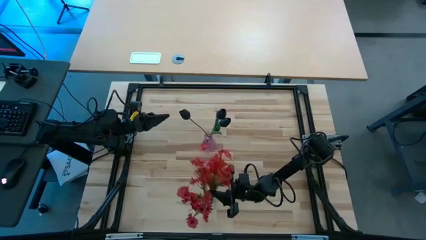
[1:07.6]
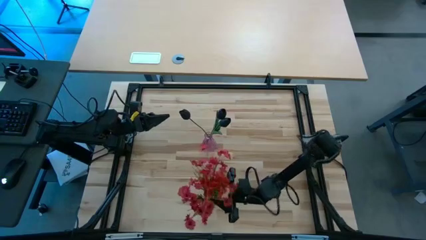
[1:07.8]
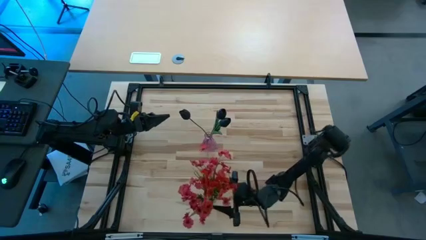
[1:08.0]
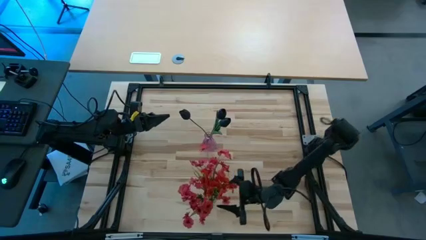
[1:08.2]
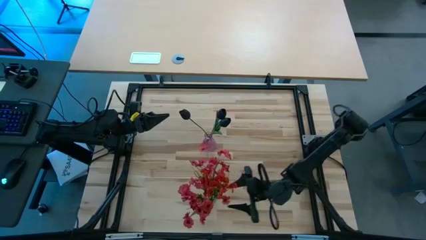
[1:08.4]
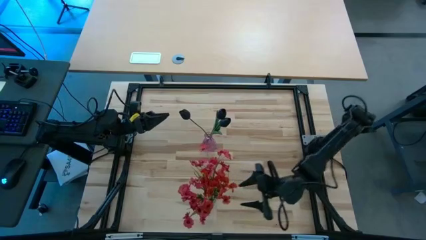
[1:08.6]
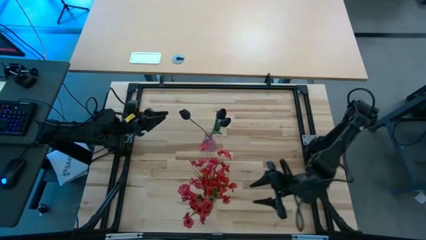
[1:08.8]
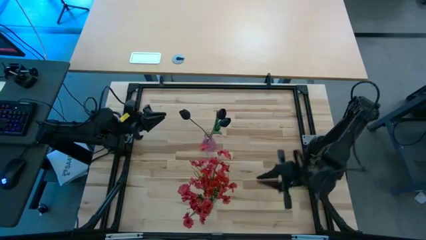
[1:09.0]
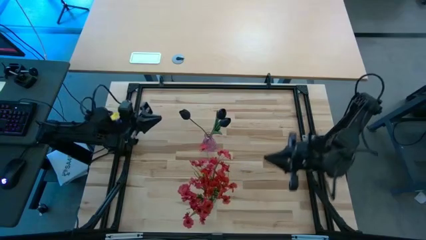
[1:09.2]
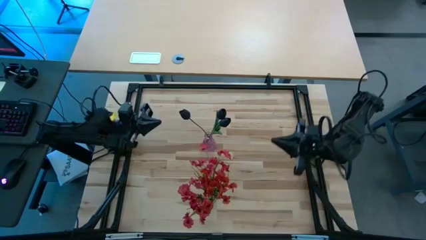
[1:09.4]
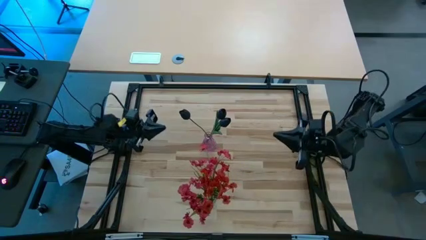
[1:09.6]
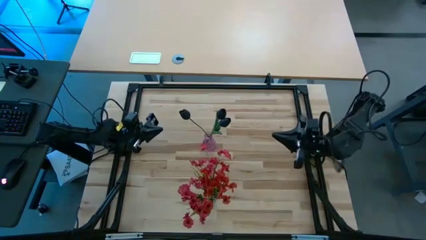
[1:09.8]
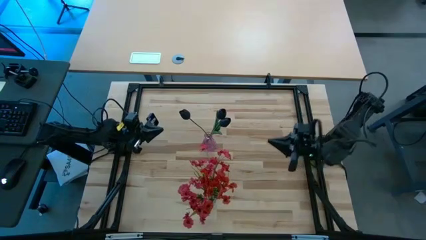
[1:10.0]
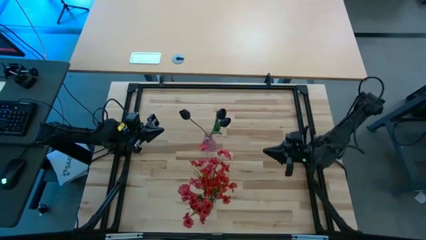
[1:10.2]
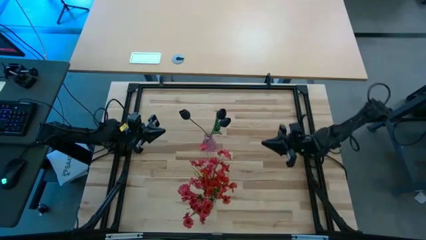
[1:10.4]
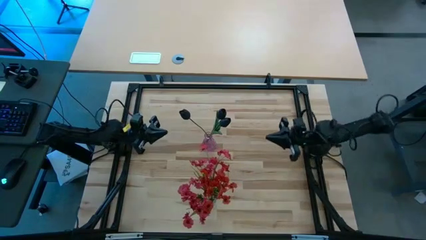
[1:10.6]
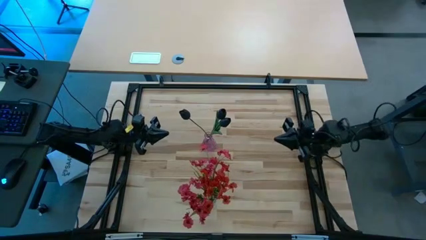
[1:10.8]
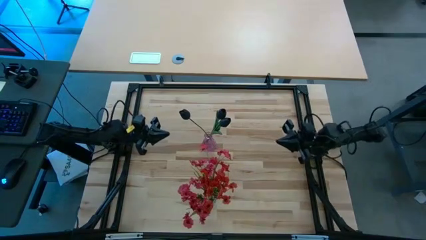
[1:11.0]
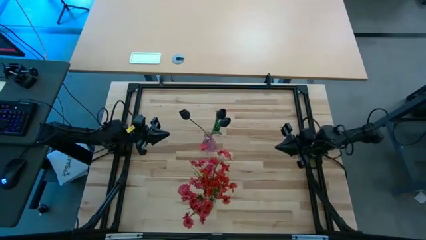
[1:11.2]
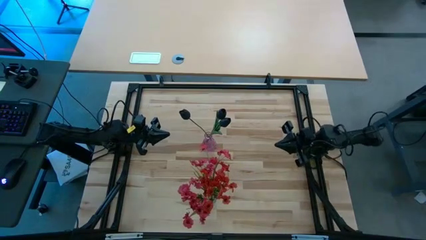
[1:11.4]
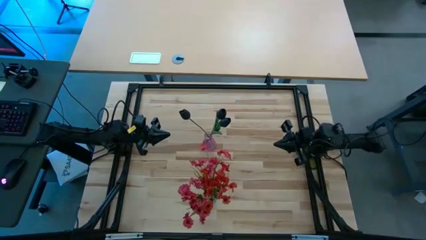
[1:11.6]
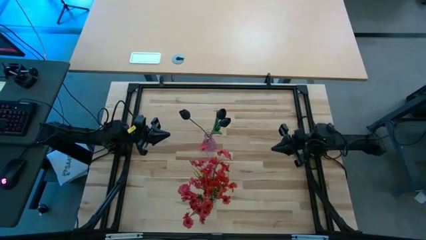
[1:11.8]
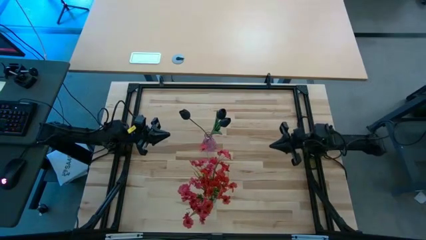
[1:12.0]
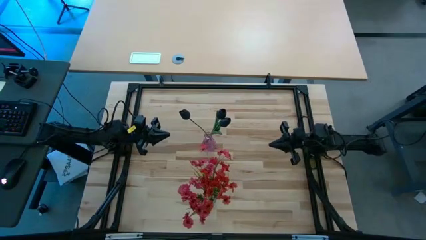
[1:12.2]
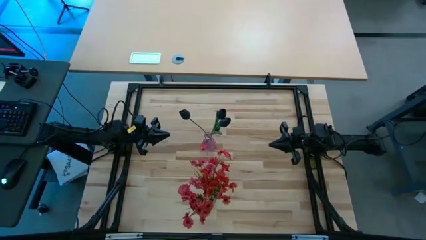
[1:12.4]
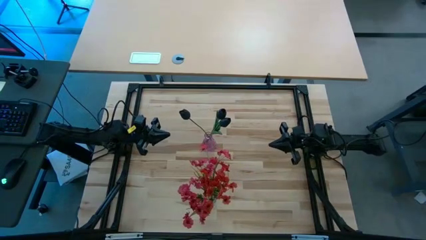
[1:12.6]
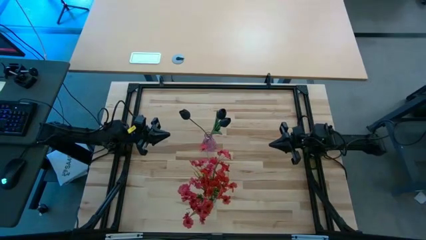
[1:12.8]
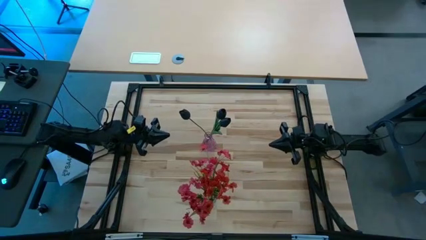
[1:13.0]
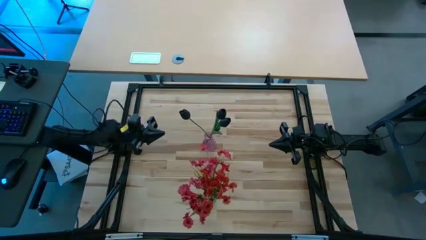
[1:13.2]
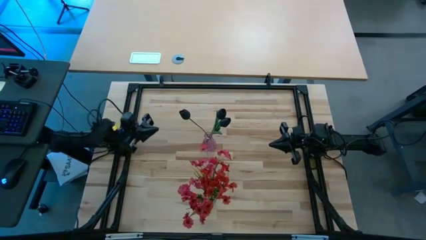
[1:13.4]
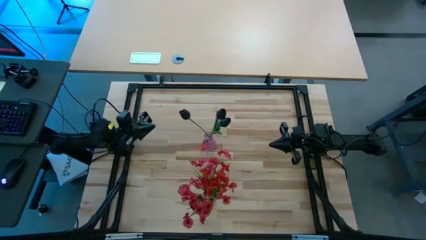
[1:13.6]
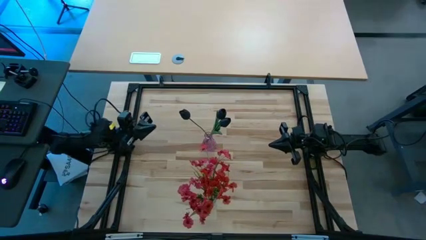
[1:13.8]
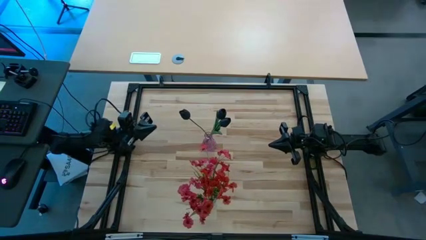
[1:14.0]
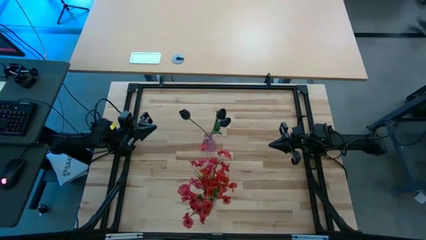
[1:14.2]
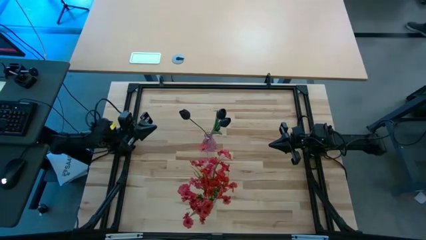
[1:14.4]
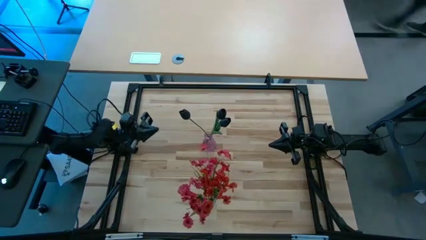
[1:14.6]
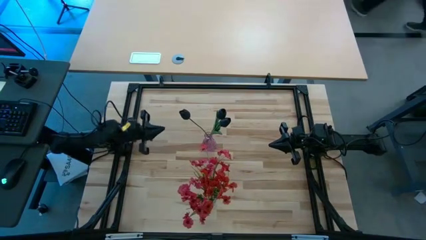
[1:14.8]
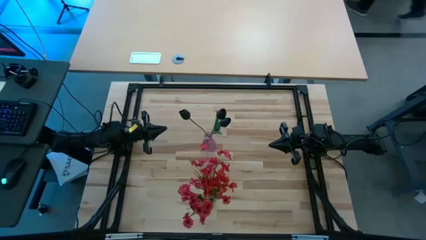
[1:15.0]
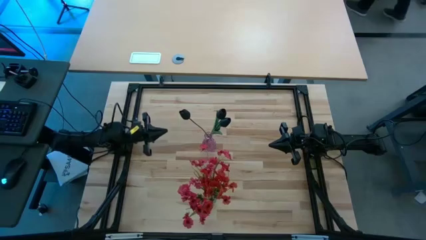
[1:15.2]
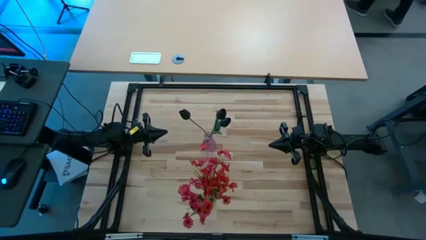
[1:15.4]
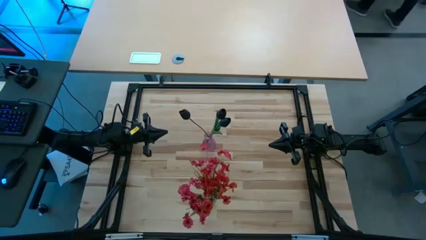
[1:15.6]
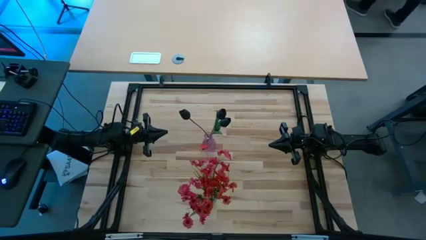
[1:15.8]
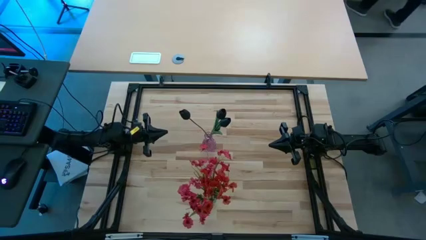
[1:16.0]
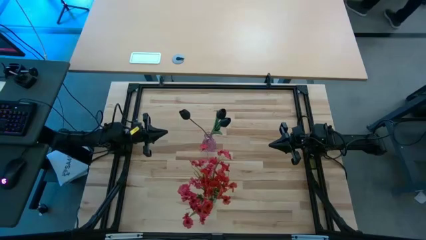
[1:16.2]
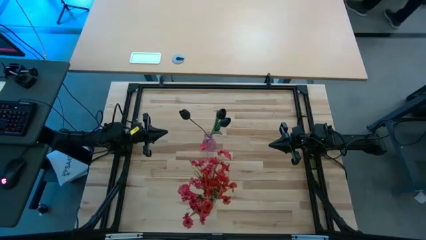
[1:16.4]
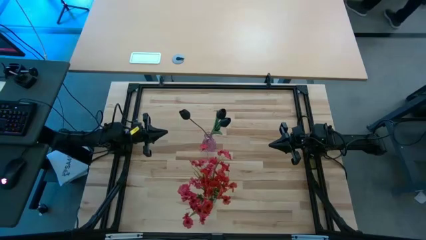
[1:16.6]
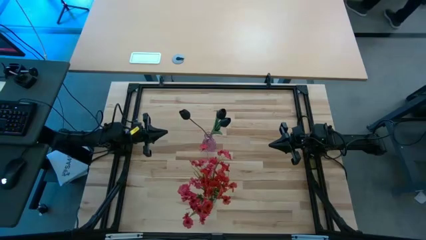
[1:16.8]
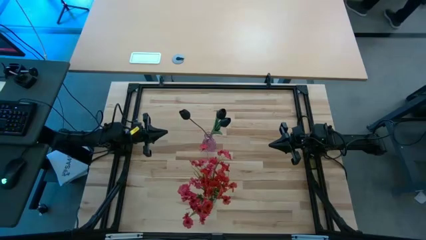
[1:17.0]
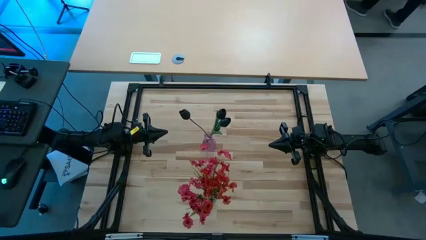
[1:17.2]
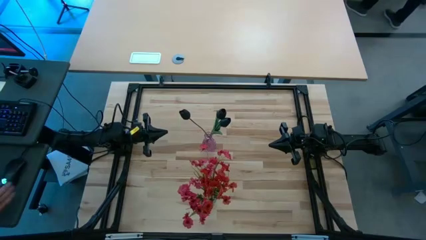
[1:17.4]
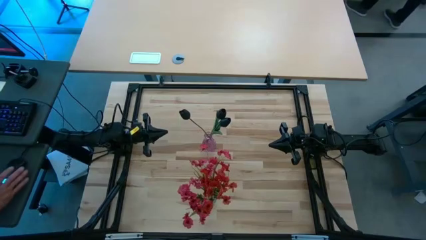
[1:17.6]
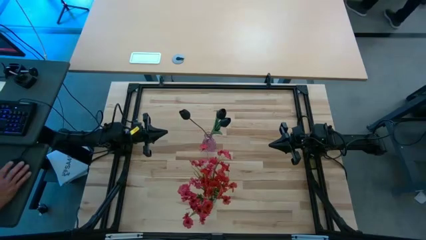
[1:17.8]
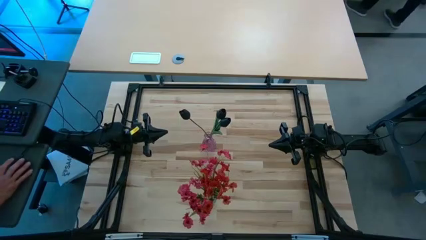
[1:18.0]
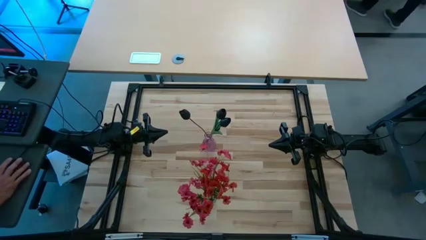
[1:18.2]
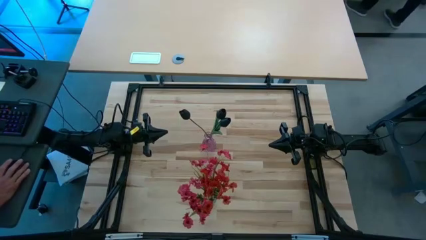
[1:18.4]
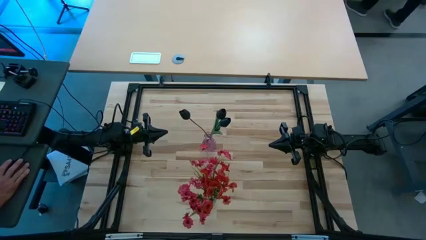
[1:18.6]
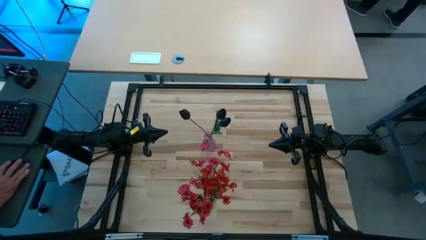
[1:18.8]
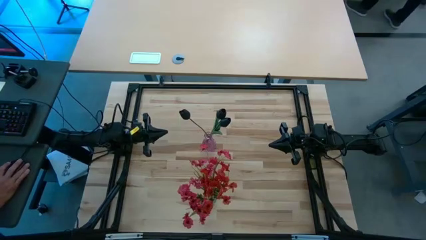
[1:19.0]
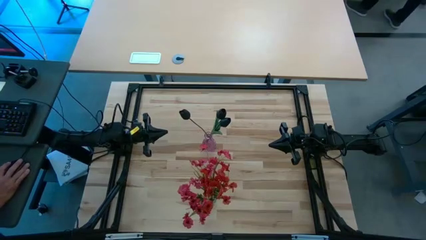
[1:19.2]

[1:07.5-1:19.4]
Task: Sort flowers into vase by color
Return to Home Position

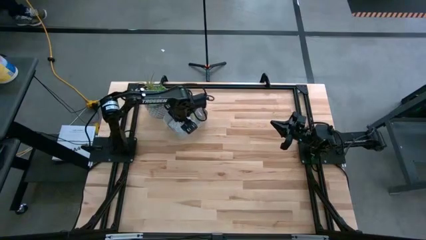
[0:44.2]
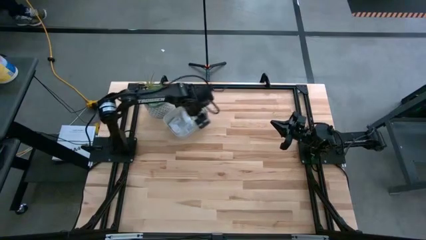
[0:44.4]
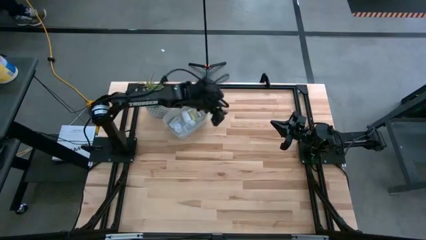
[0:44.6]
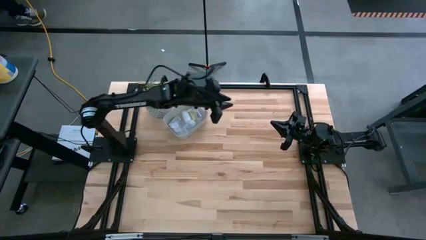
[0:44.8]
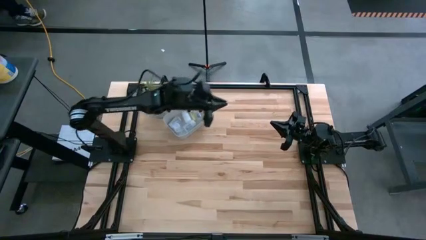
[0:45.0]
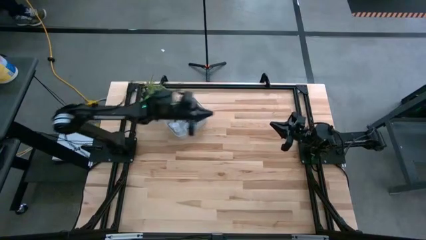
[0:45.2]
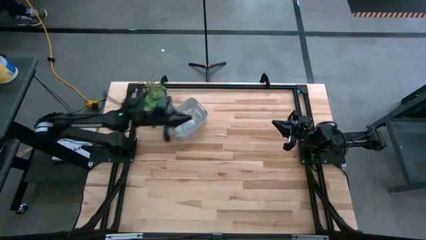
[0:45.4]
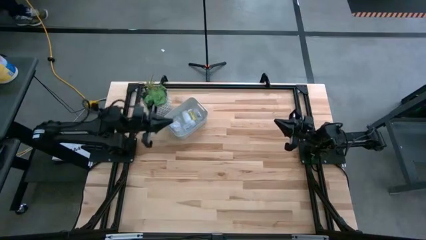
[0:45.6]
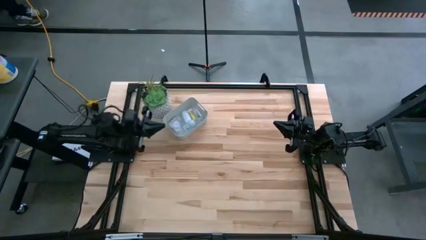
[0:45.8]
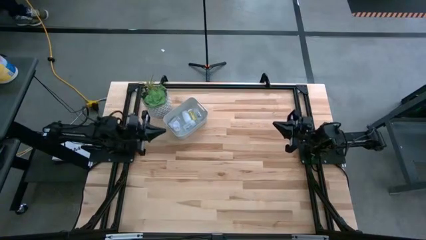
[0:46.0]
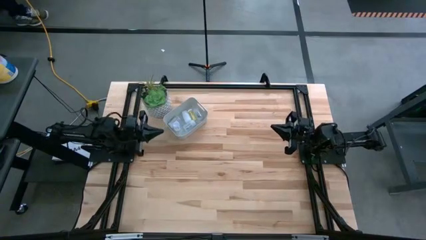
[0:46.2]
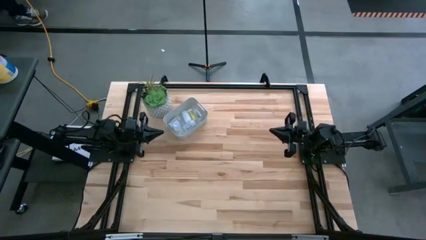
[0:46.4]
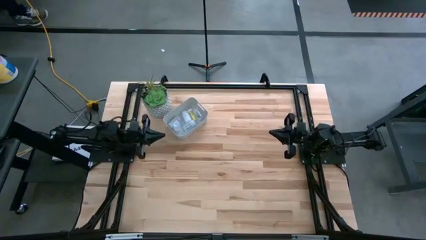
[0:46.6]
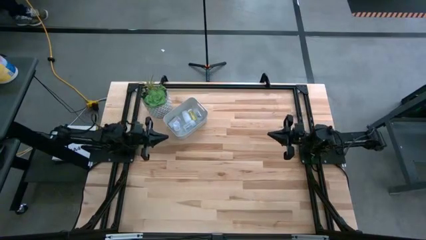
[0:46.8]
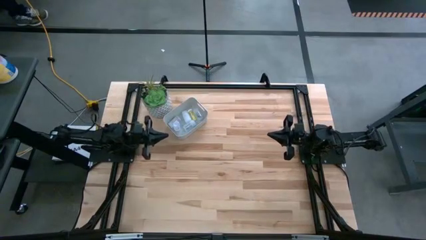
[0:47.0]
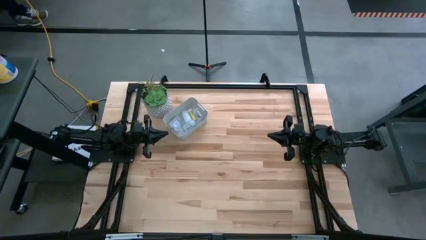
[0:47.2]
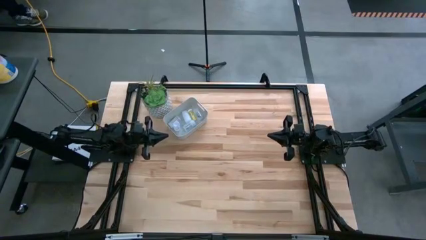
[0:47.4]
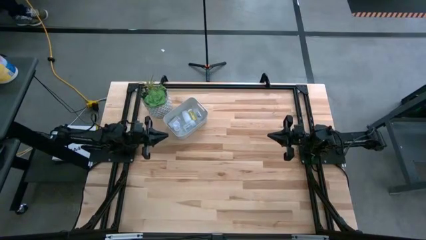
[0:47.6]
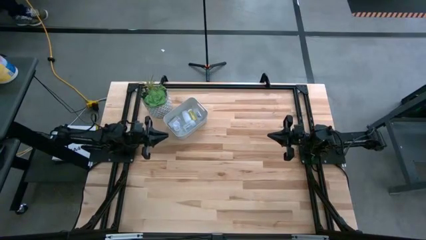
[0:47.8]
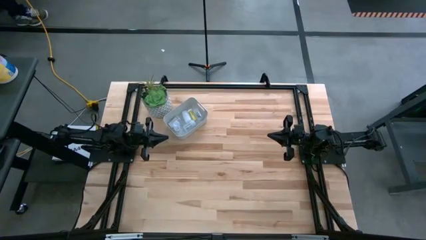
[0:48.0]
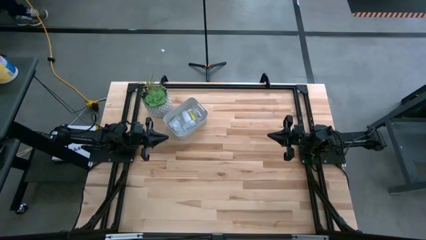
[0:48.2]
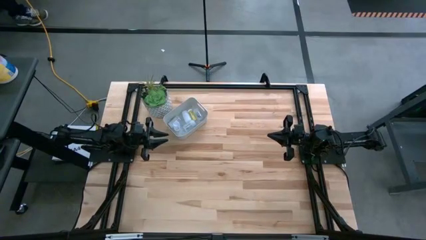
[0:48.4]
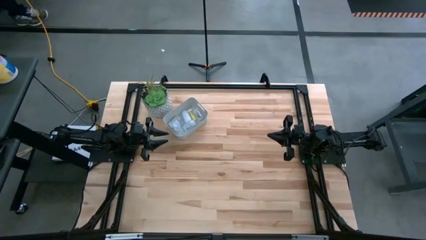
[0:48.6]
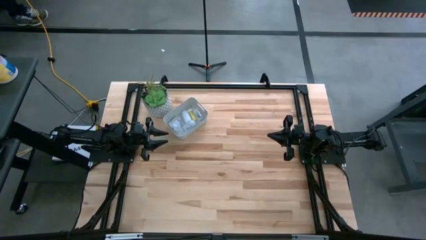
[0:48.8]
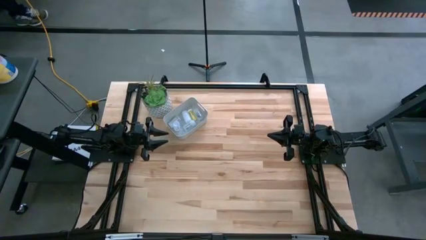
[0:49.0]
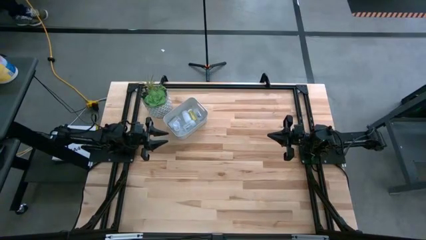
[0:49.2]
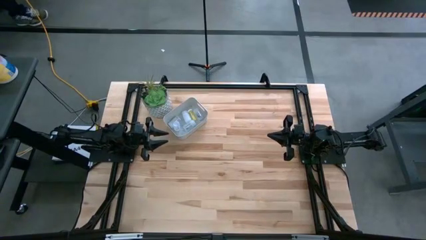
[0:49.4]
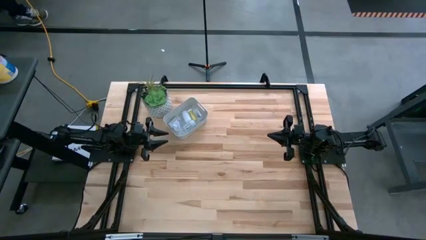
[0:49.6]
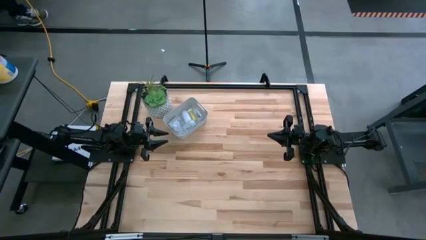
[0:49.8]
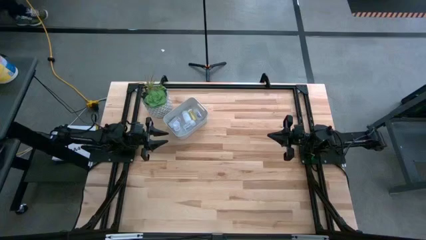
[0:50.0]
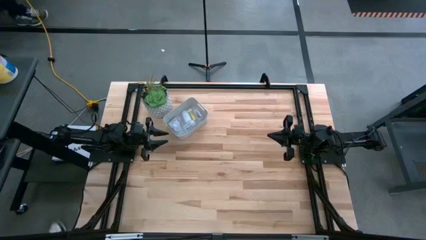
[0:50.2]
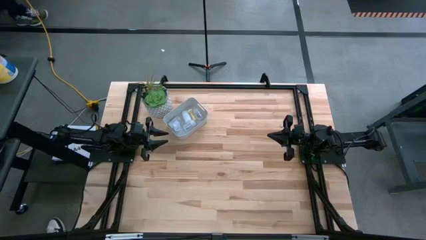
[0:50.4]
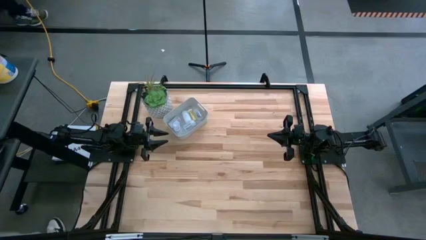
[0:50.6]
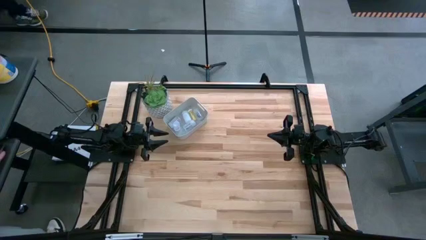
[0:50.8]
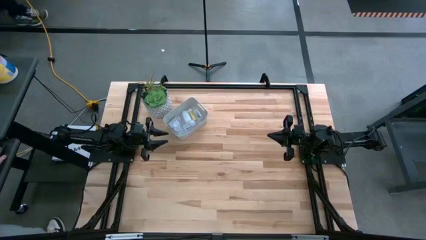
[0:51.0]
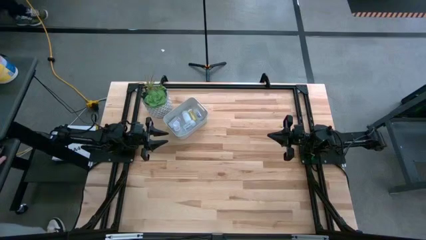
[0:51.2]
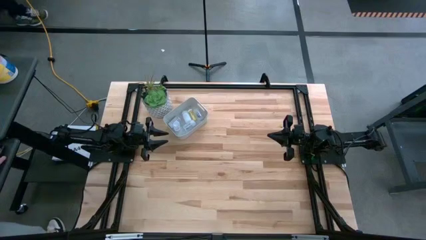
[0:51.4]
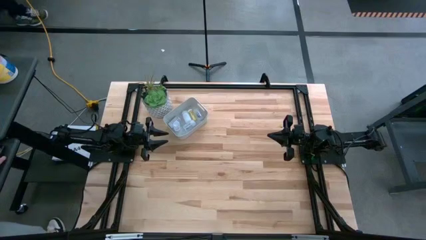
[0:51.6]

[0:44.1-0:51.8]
Task: Pick and place pill bottles into a basket
Return to Home Position
